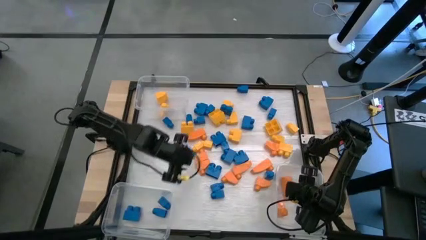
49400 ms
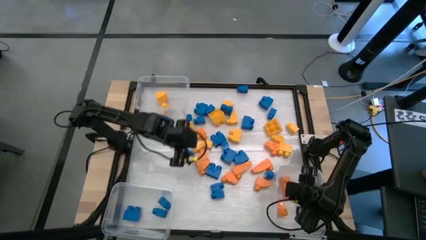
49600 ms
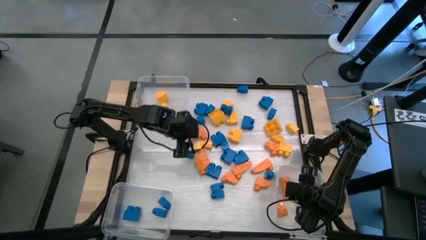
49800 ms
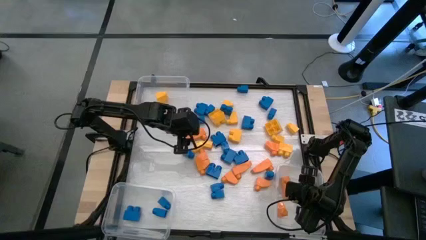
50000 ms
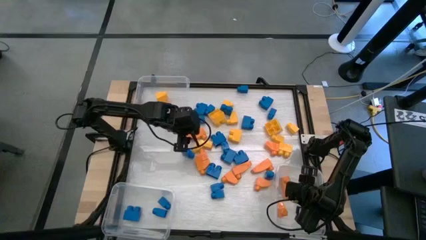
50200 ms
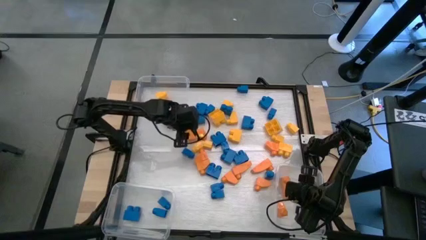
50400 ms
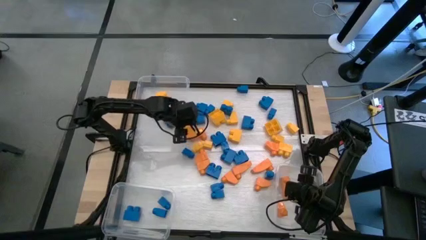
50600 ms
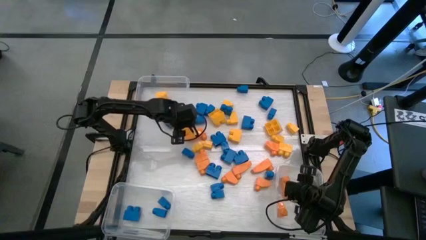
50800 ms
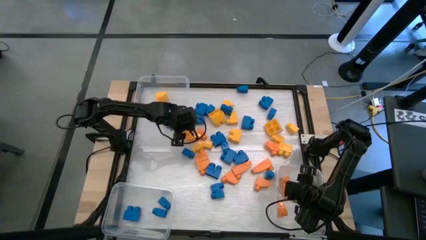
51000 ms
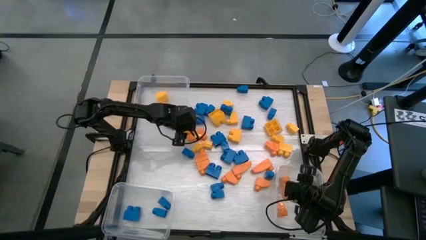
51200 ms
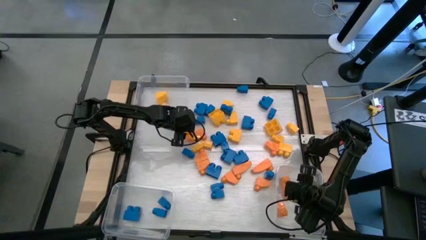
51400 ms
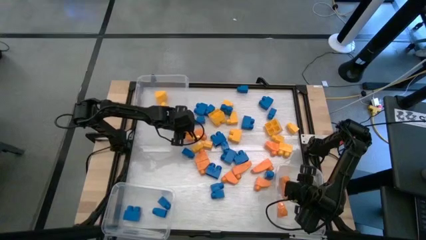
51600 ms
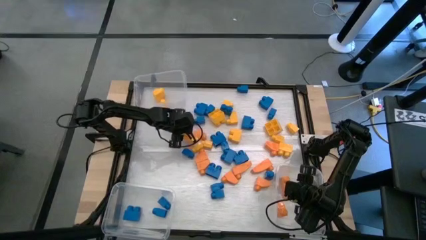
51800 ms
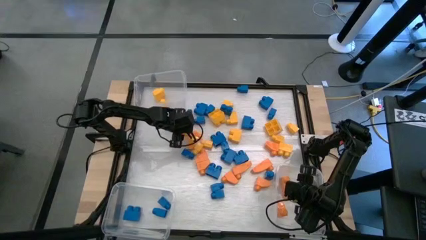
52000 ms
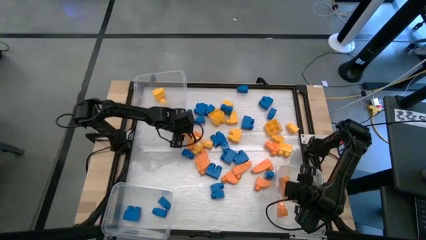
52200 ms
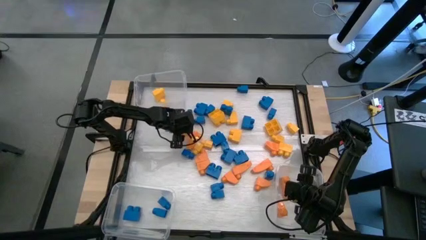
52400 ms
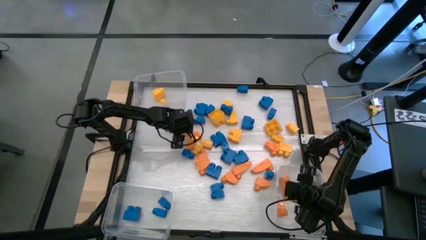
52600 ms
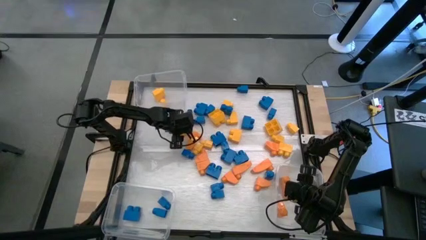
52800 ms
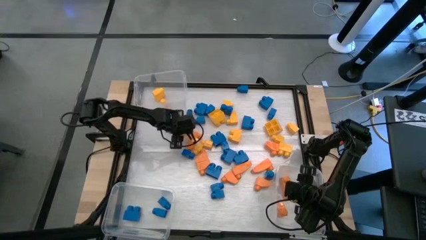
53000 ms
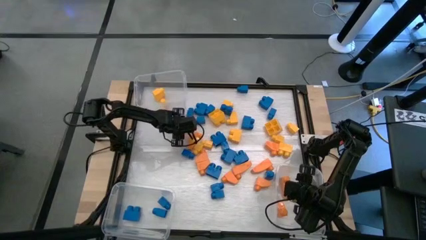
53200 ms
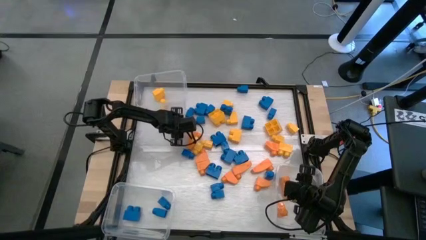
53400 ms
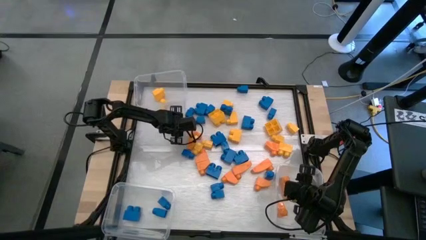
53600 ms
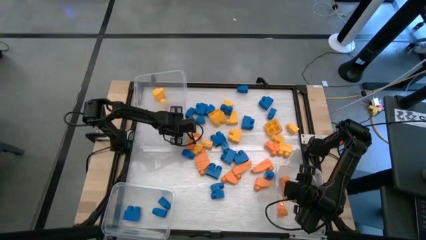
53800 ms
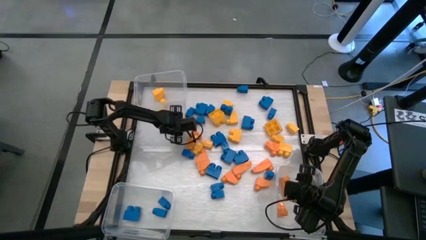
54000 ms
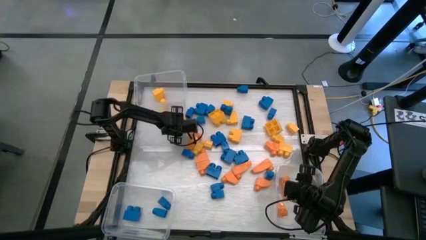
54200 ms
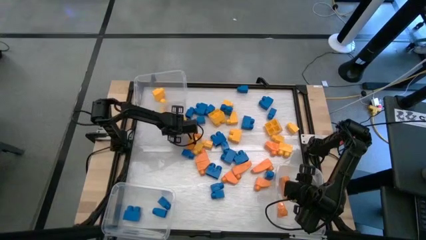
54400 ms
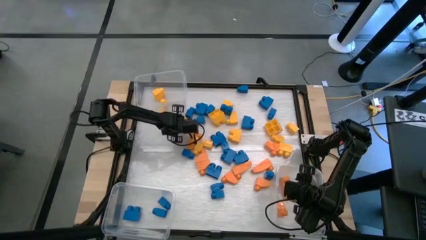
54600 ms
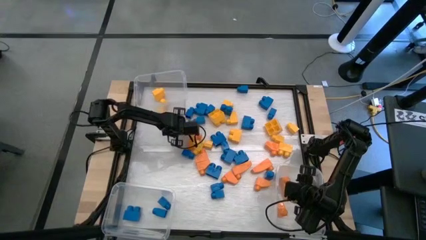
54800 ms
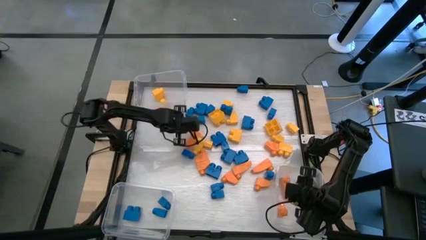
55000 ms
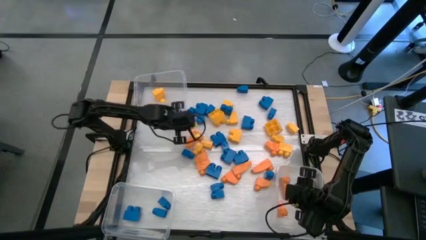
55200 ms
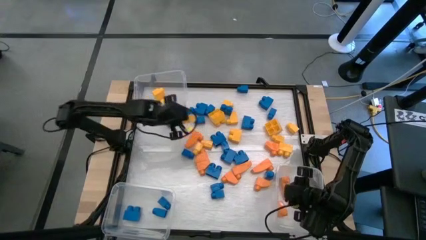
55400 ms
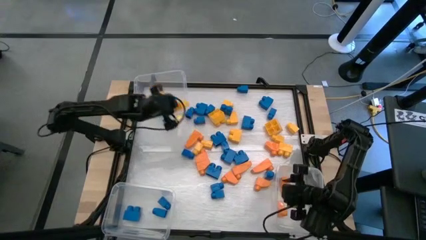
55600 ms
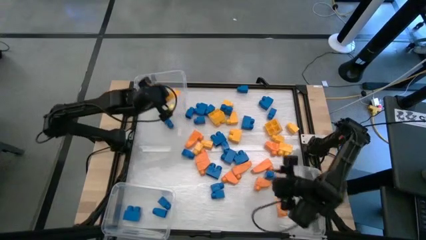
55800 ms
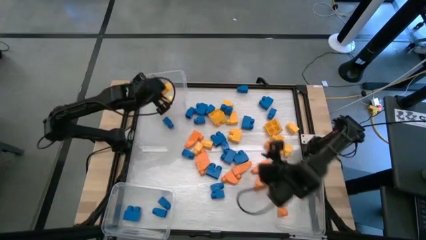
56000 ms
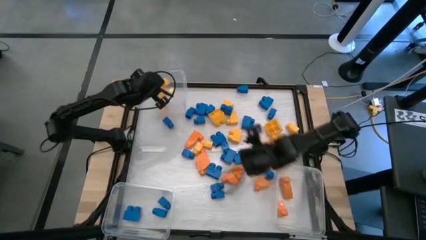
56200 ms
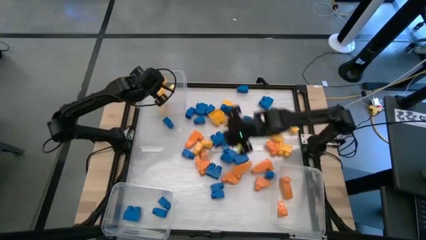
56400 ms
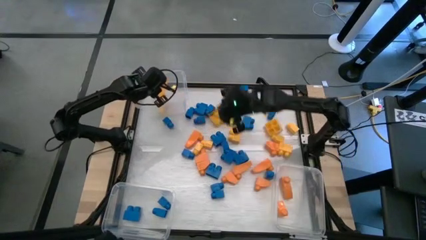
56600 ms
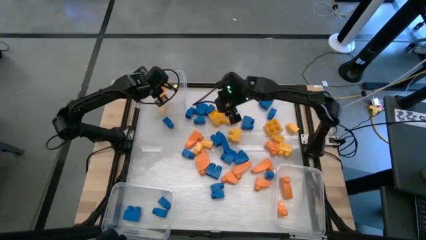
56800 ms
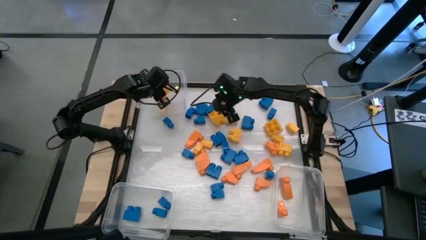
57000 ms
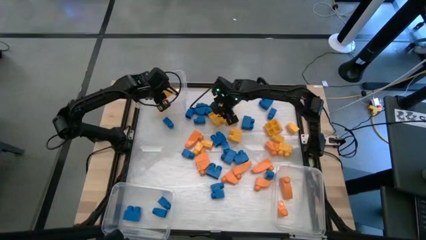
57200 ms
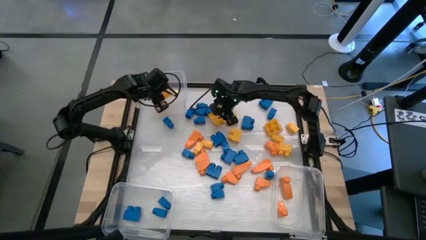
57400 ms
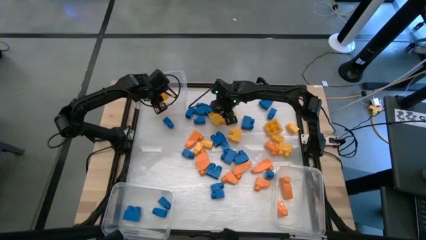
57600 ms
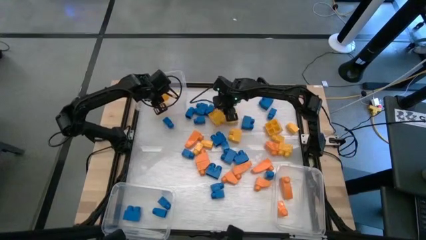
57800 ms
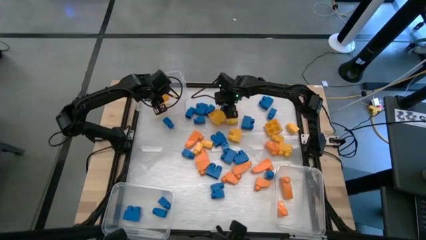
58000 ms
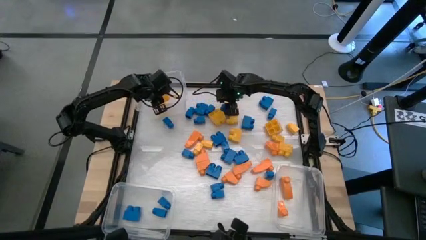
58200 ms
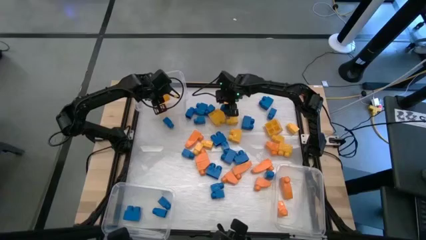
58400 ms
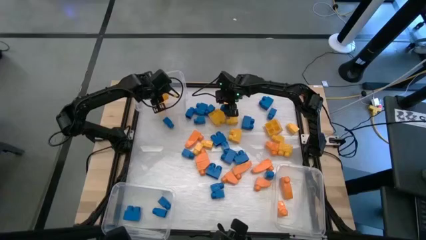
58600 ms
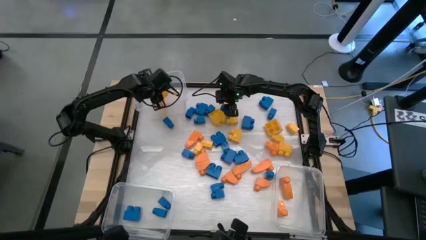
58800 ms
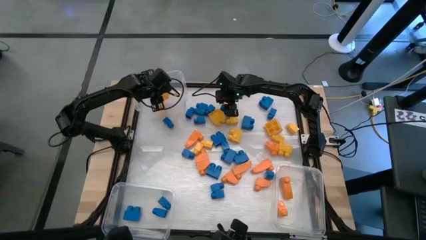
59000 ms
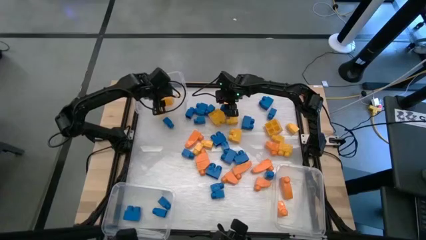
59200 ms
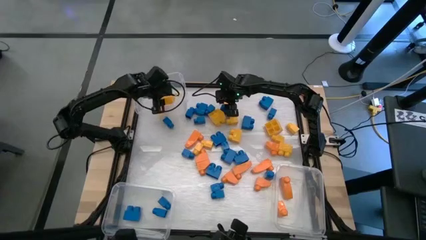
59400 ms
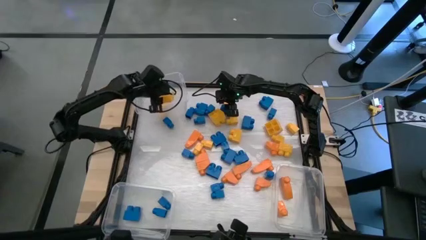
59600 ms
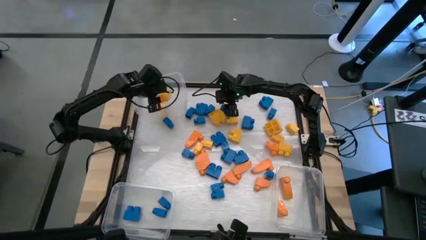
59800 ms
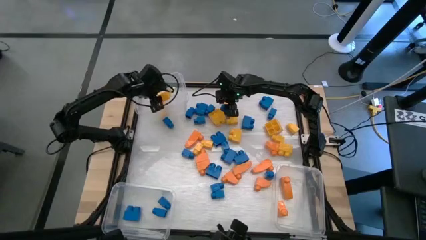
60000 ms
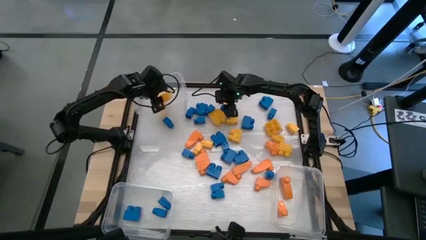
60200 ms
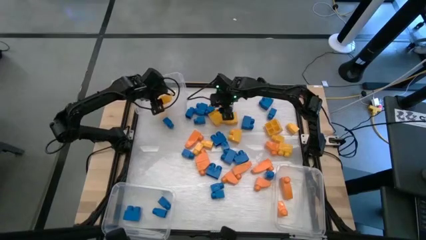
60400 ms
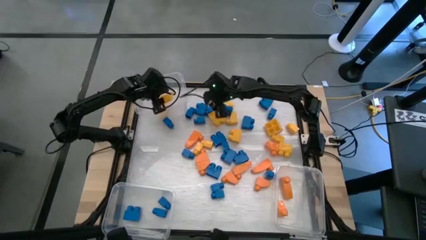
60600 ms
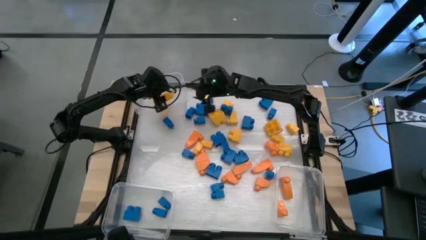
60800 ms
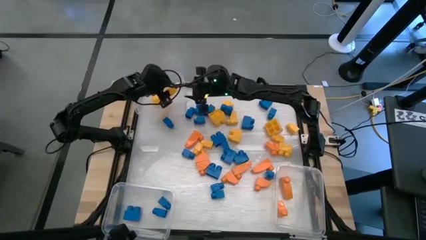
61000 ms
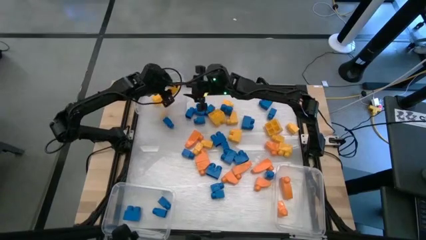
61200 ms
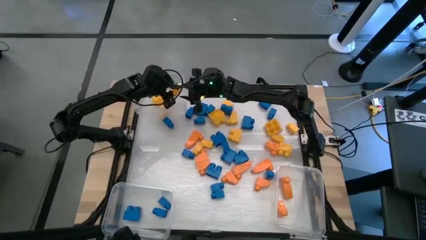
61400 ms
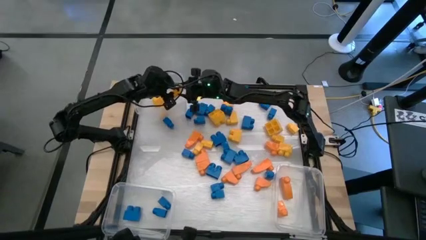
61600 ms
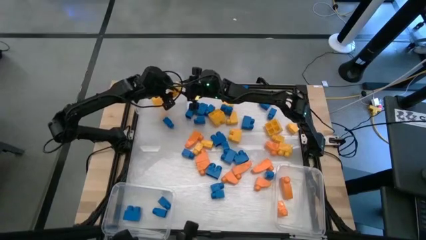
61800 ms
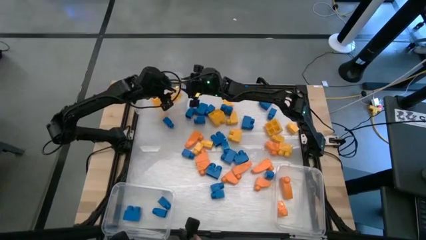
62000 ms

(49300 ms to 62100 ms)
Task: Sort blocks
Put the yellow game piece into the top transparent bin

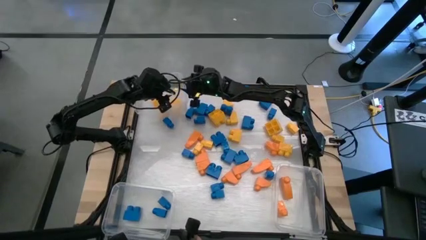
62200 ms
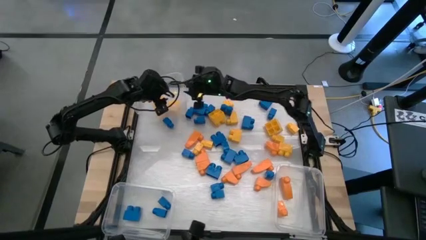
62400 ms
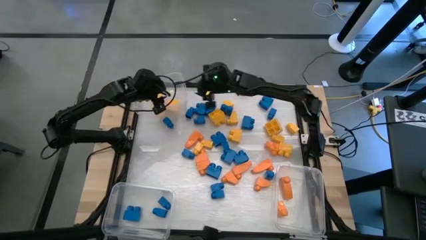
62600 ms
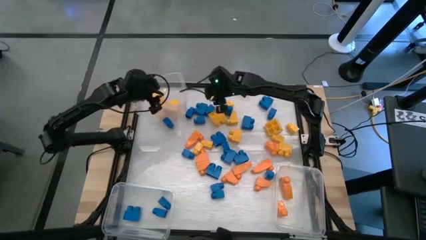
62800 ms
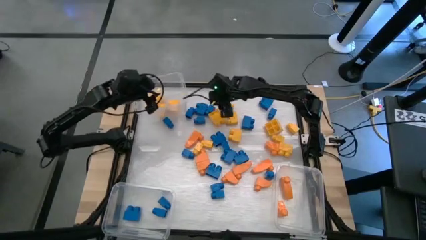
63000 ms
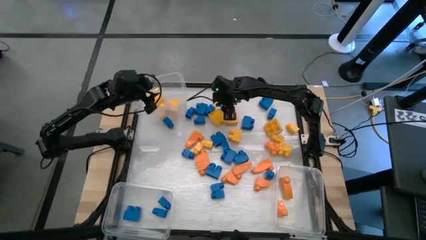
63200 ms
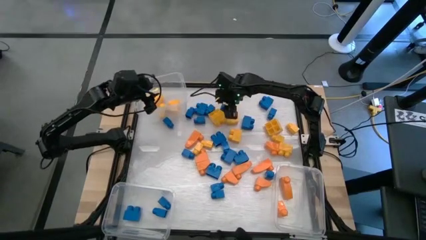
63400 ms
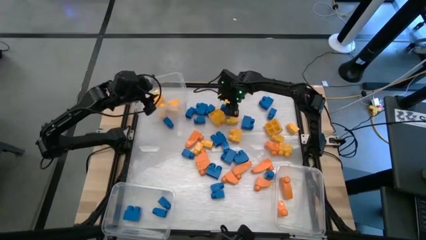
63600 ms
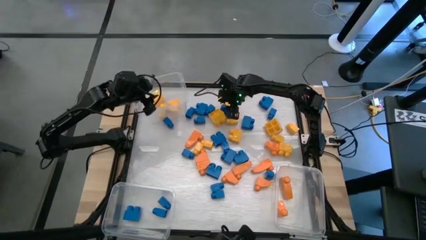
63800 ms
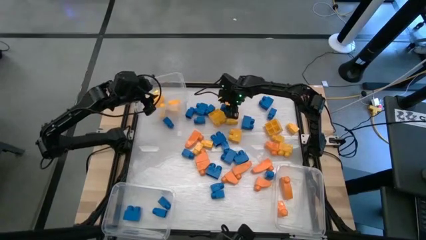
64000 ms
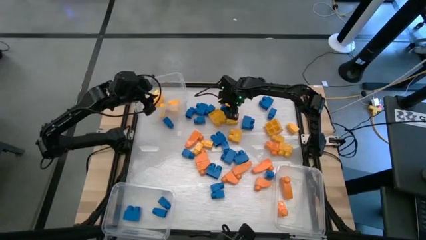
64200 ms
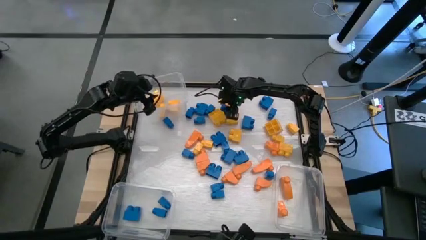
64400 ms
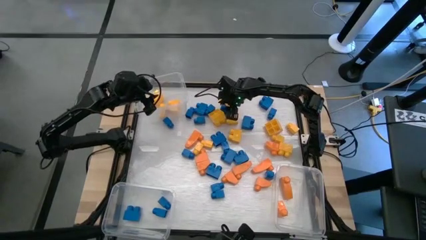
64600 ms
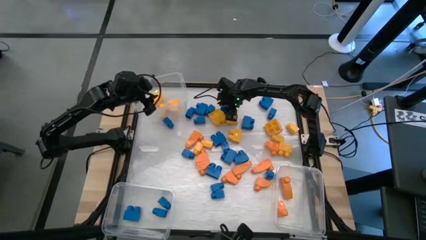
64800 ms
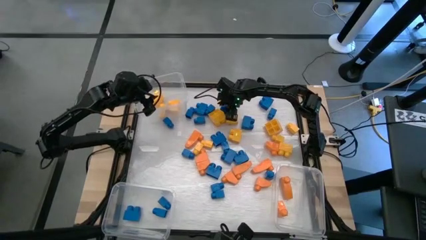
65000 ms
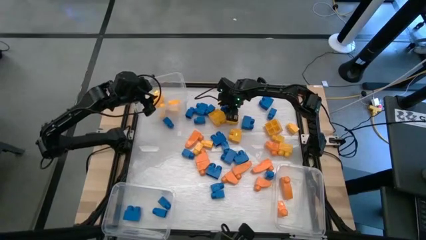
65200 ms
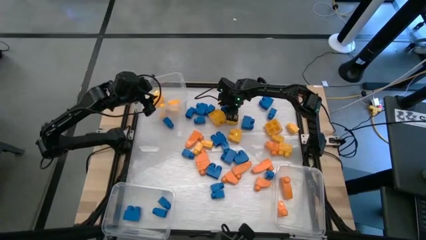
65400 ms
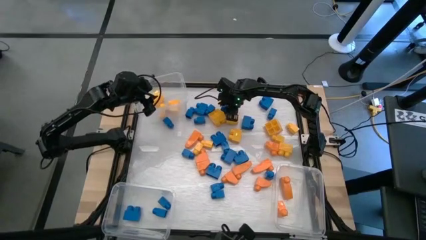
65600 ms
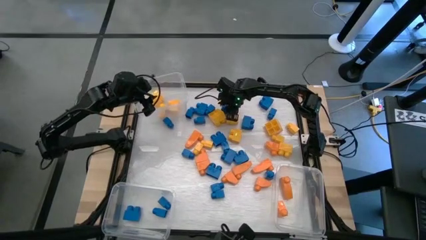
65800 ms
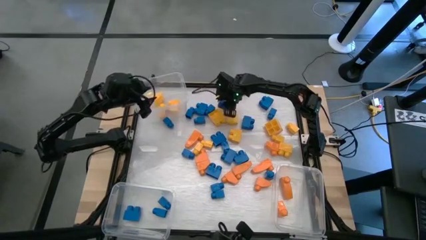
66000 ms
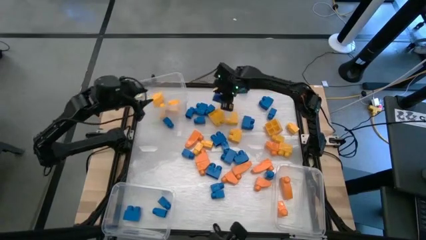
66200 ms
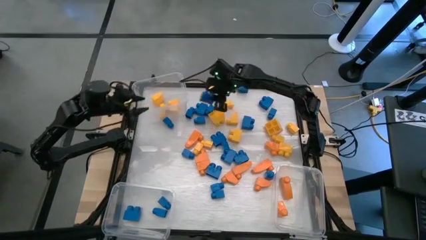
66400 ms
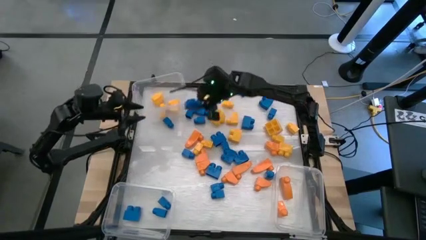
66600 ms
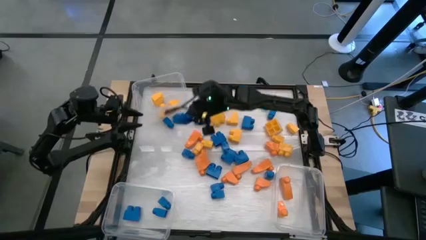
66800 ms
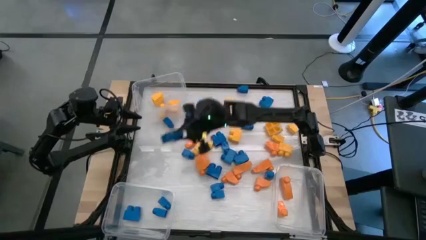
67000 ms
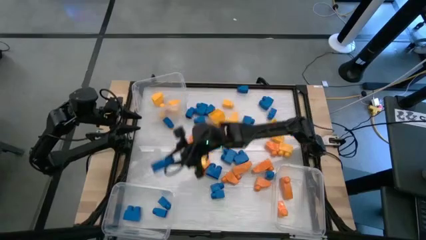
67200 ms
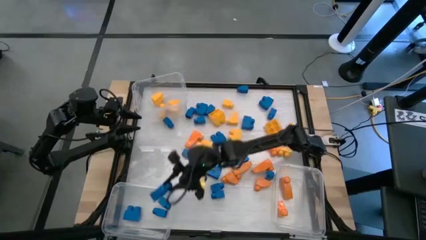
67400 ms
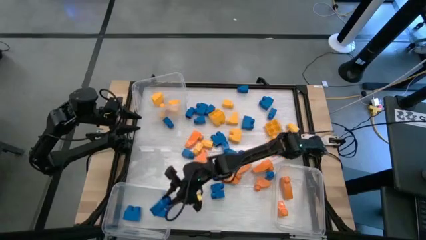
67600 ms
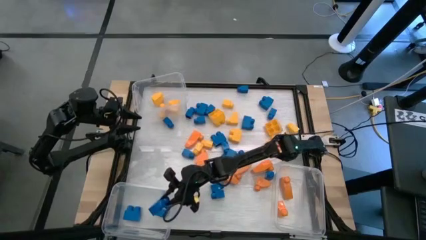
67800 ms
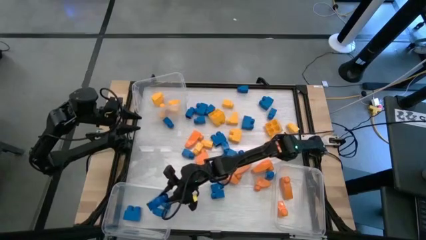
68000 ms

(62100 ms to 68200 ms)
Put the blue game piece into the bottom left transparent bin
